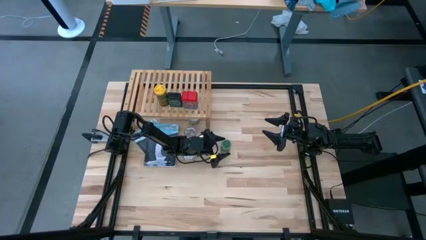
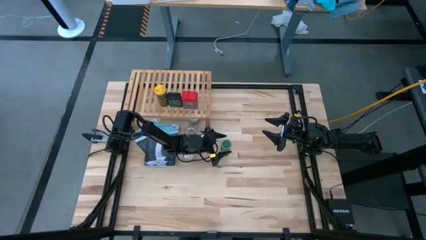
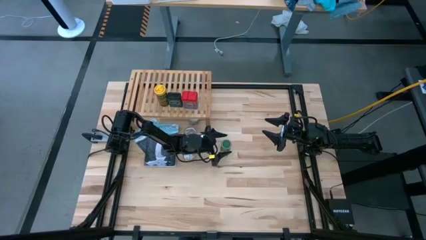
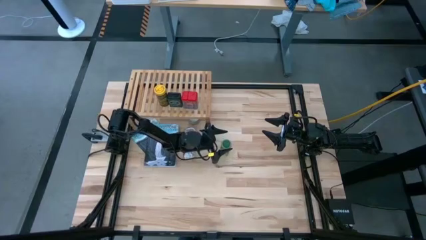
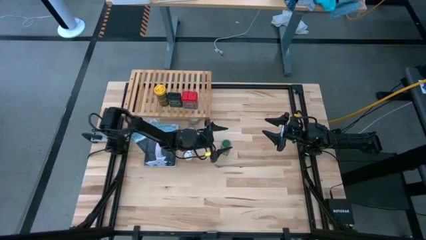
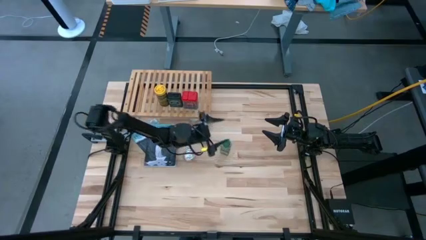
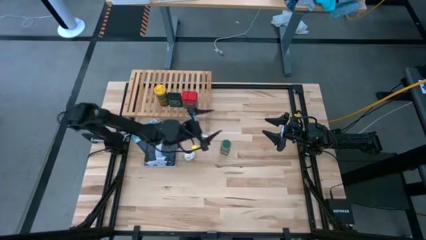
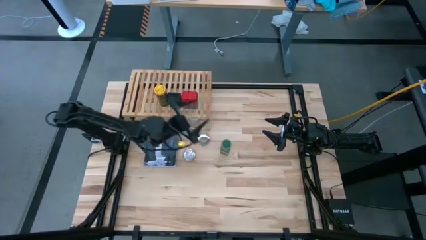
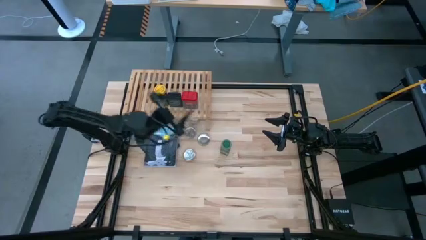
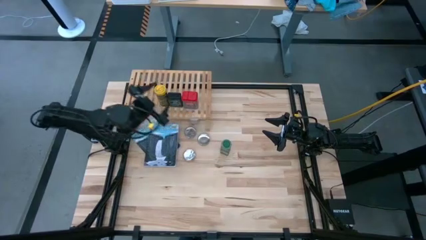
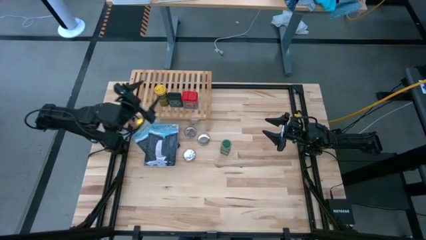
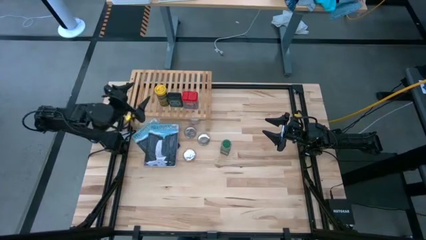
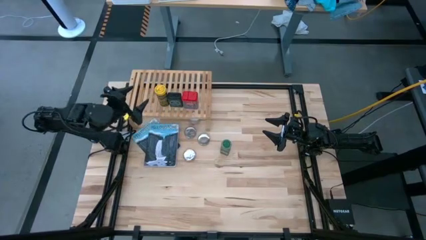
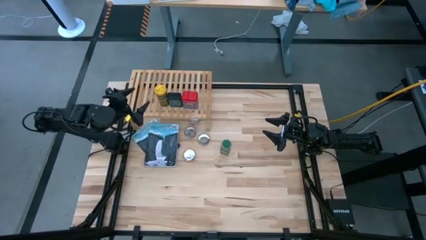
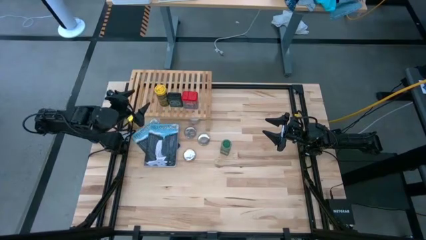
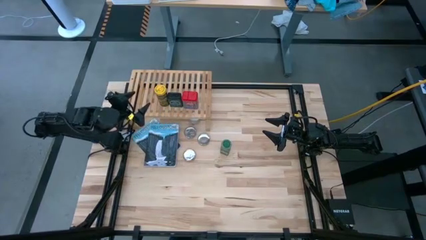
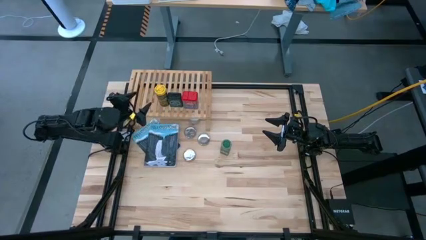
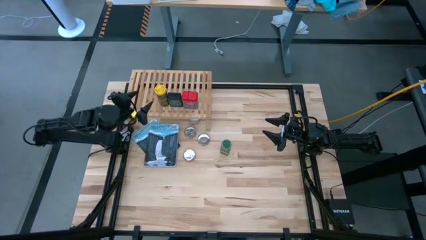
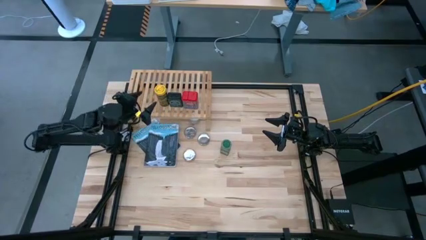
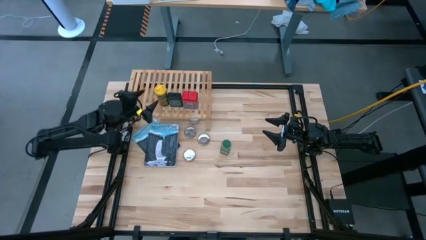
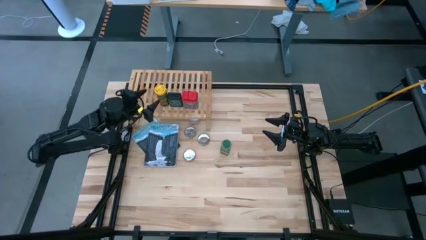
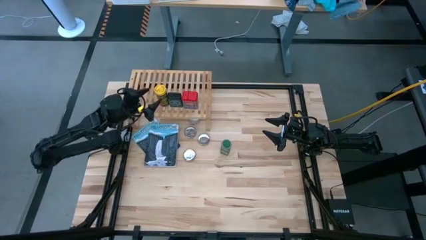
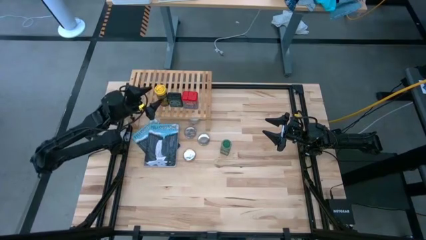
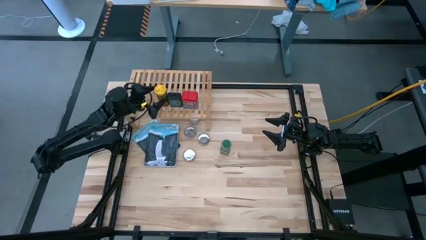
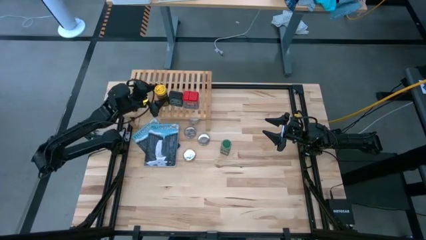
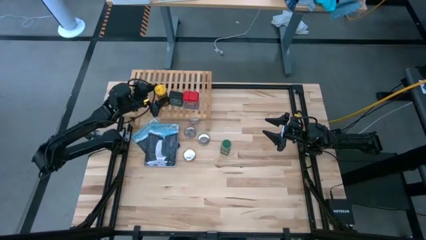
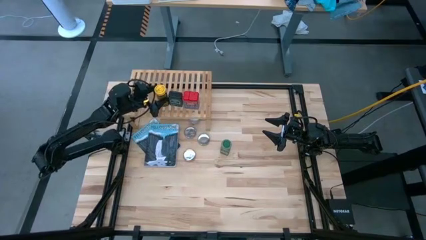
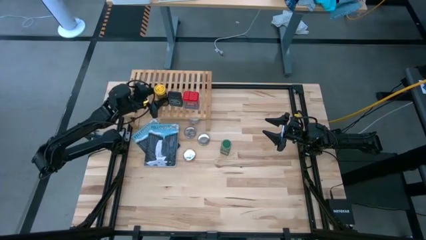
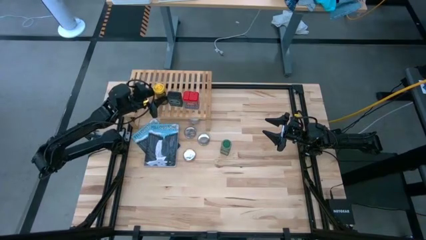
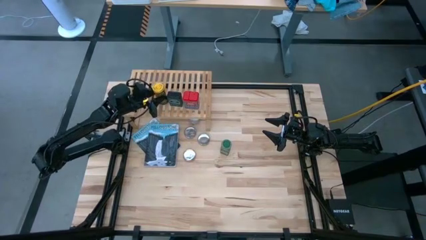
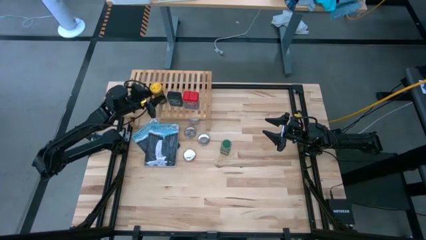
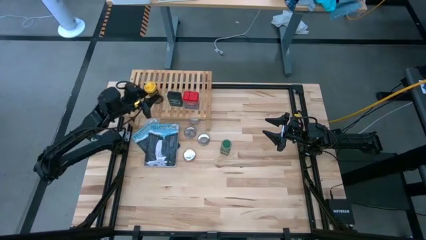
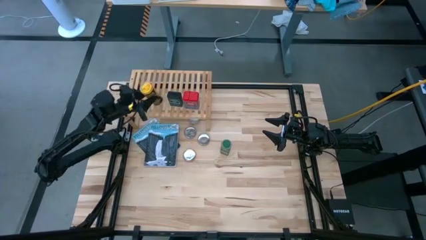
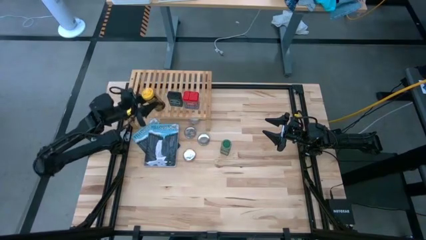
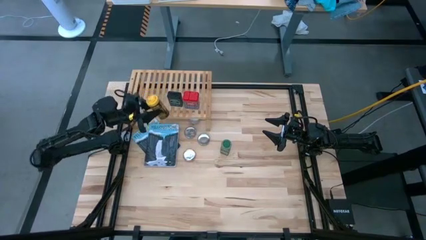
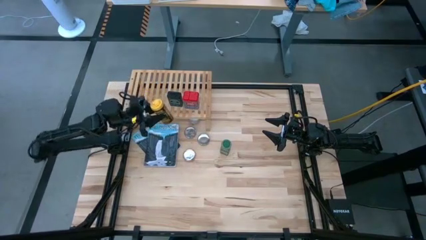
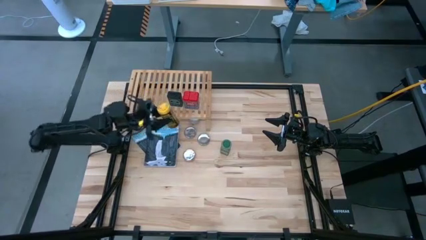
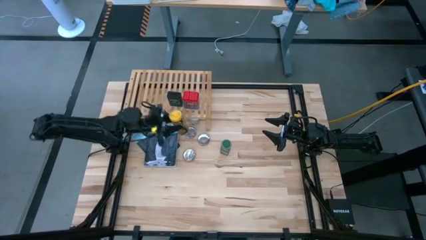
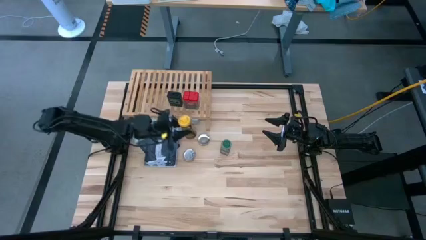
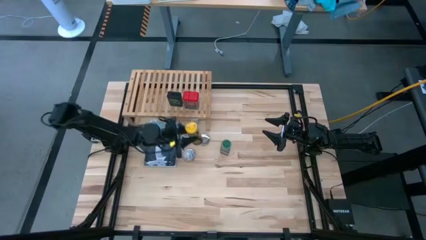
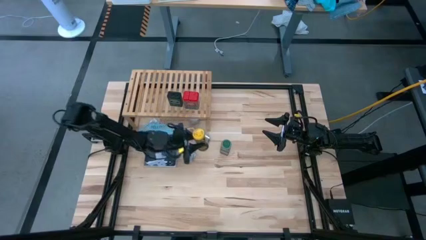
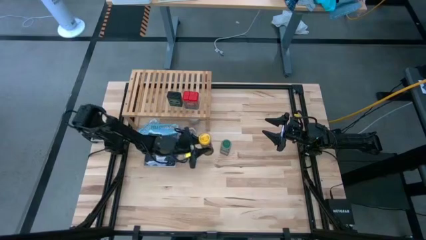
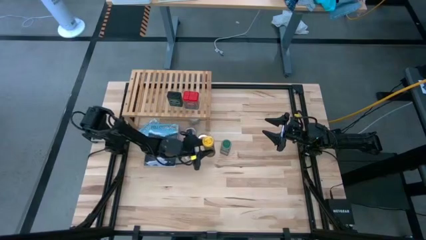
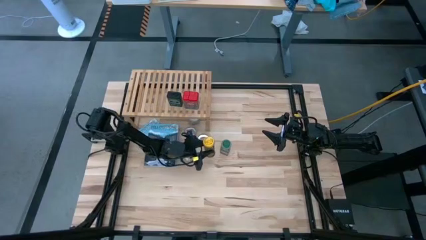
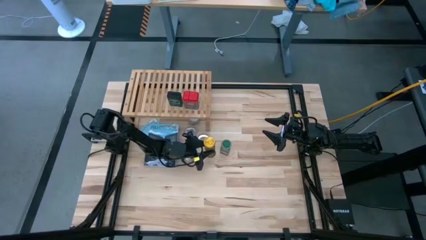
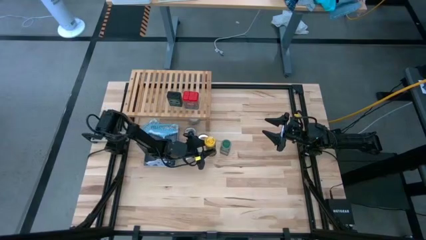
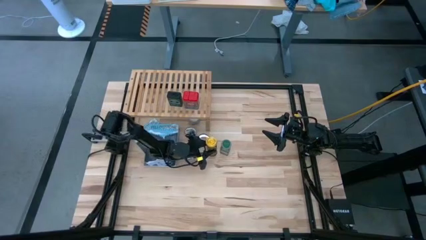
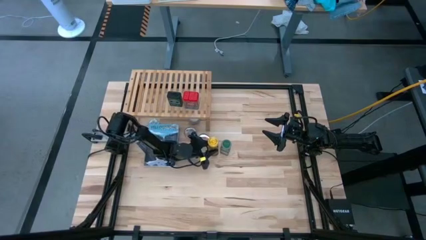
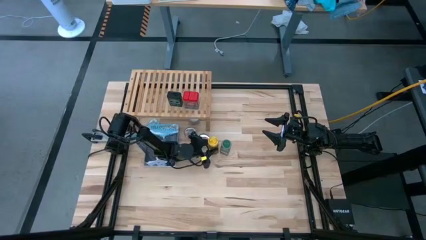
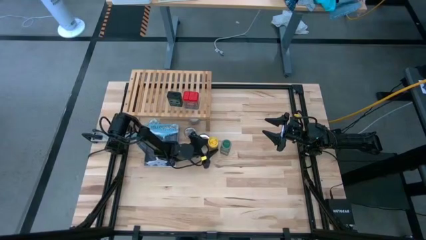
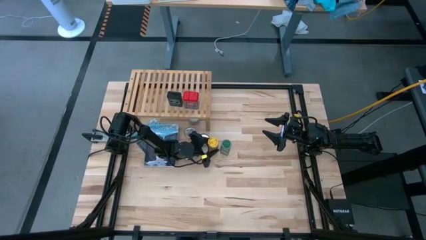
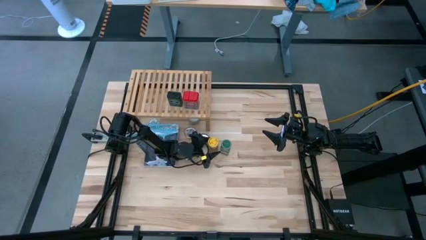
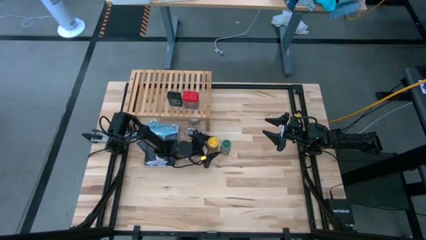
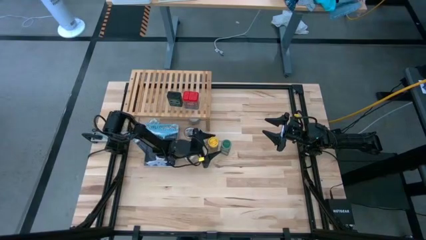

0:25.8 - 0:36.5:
Task: Shelf spices
Remove the yellow seasoning from the shelf

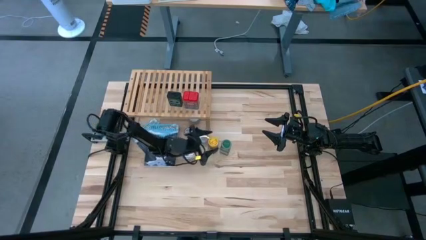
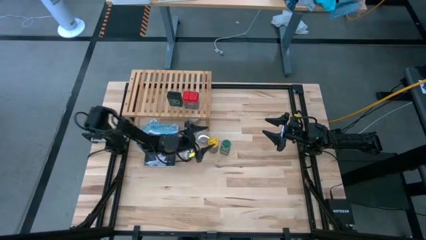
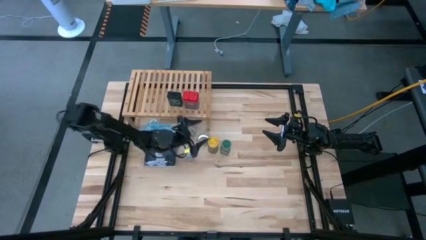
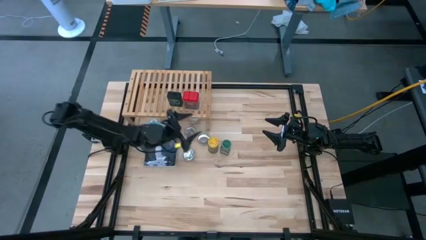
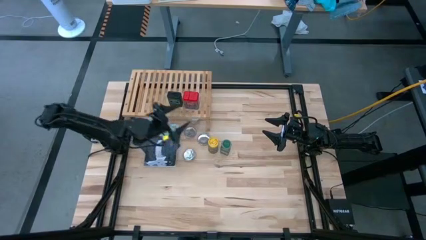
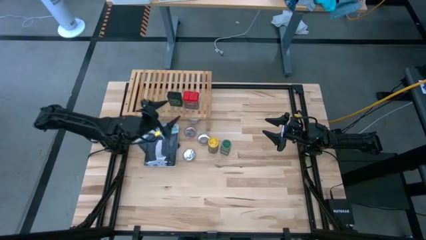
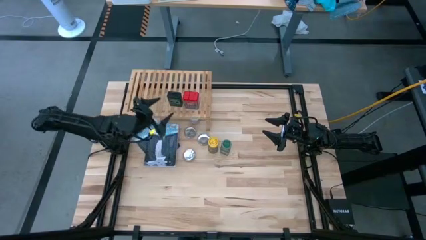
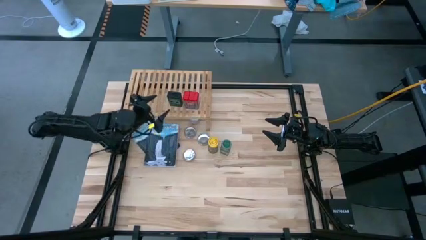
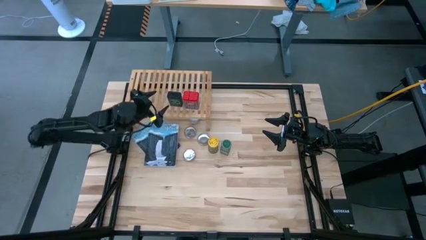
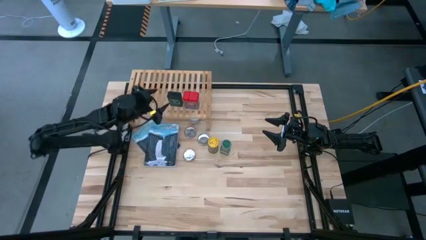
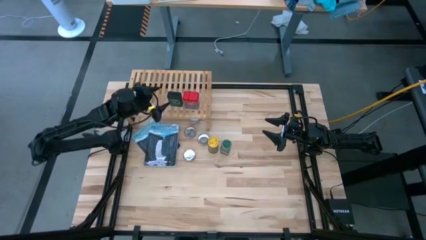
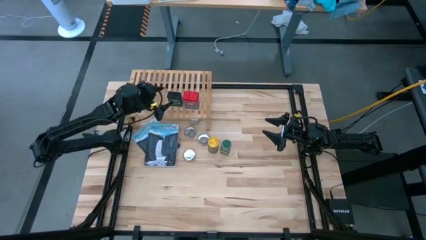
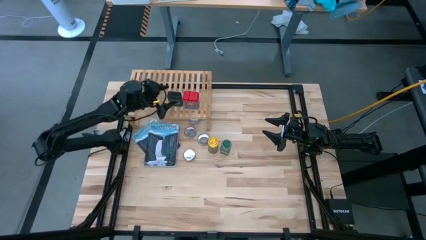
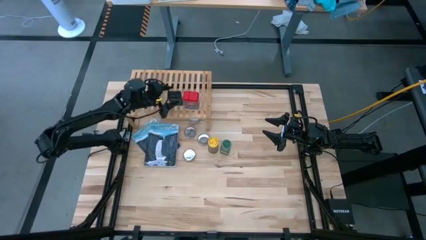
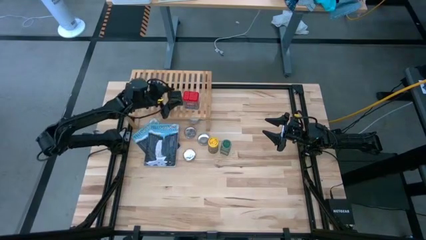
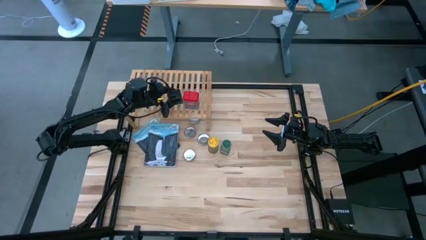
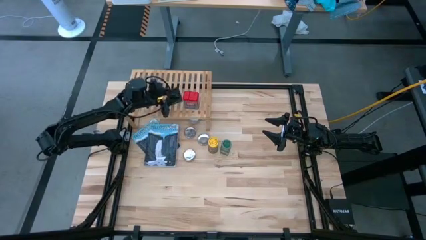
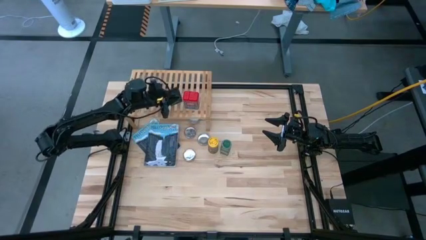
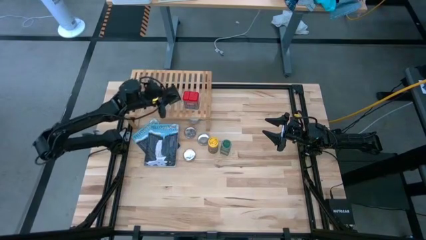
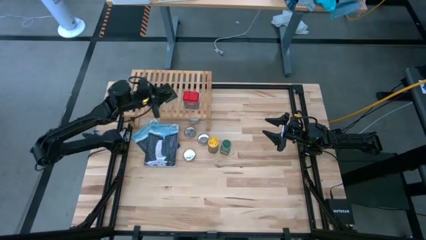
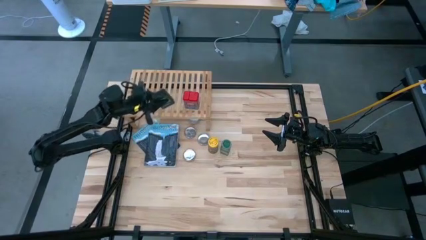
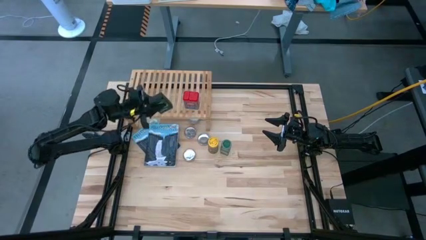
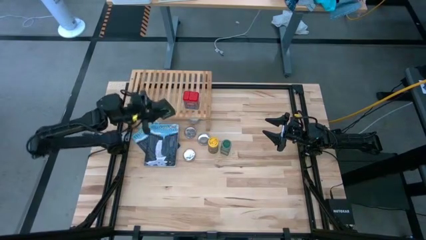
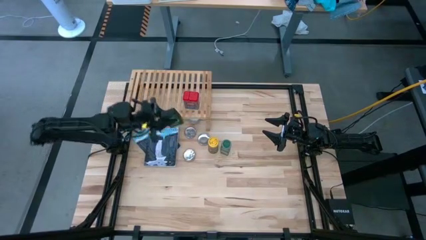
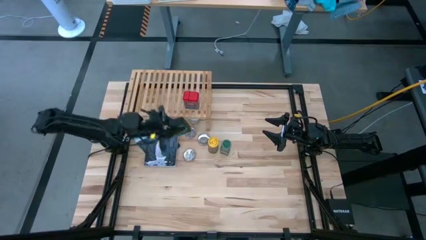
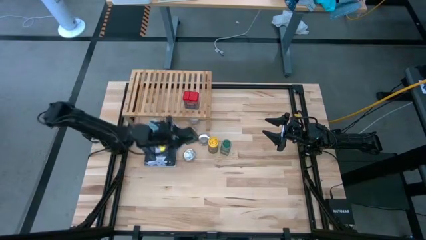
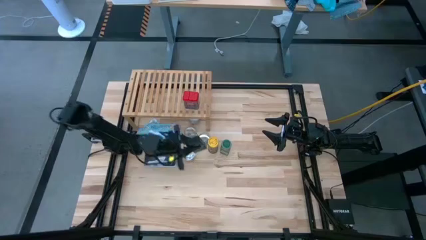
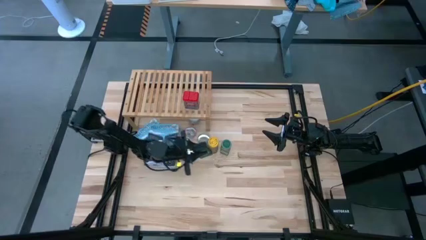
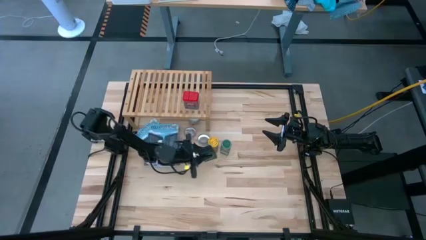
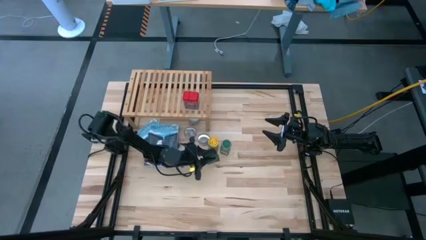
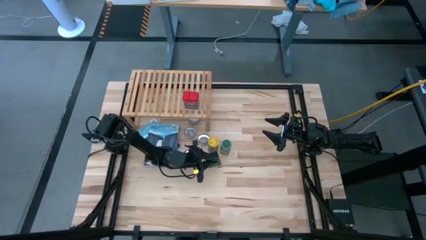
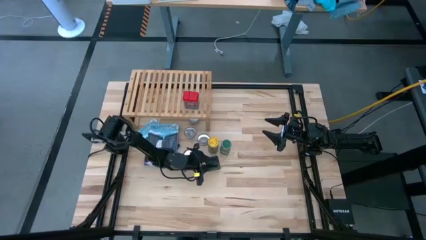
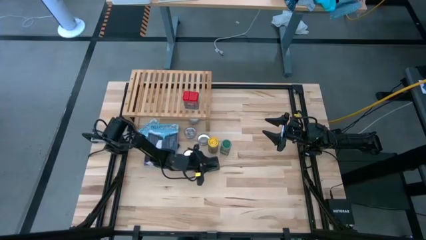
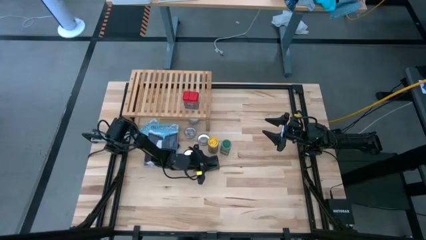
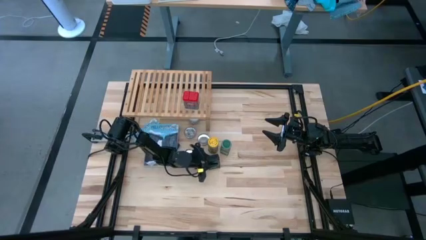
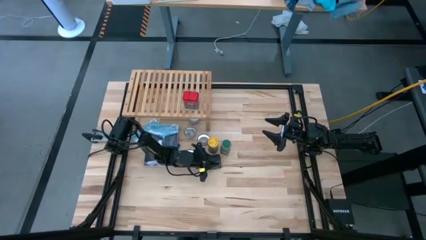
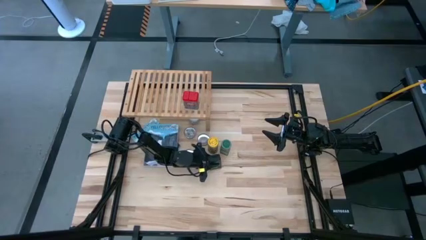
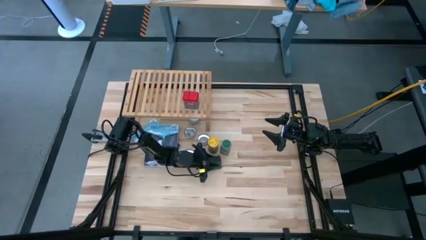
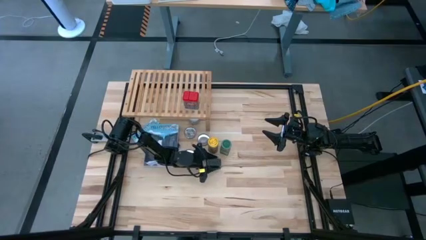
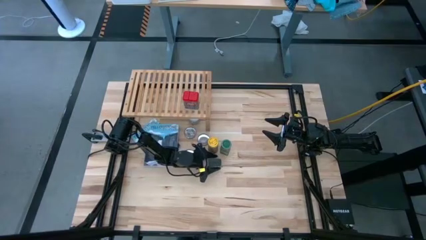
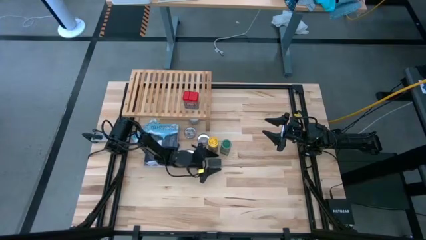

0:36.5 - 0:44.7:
Remove the black seasoning can from the shelf
